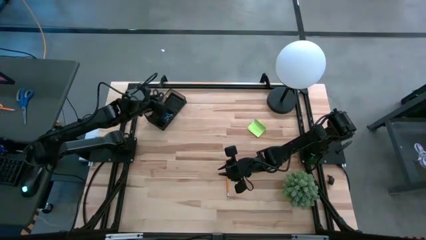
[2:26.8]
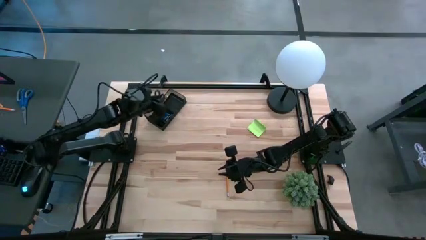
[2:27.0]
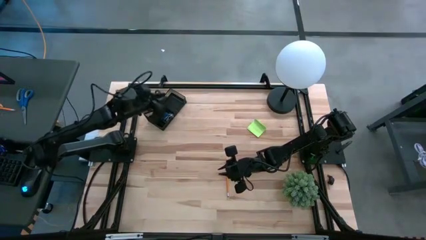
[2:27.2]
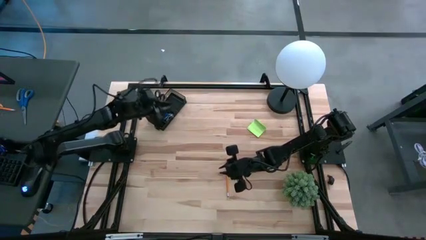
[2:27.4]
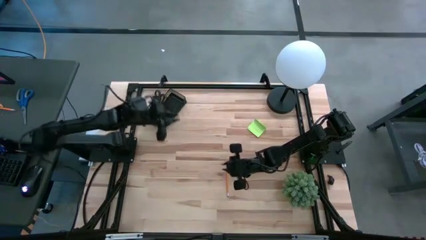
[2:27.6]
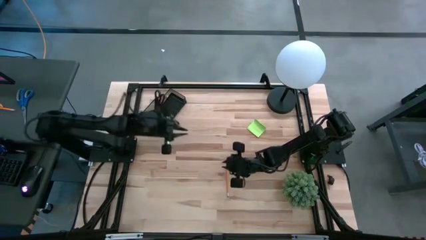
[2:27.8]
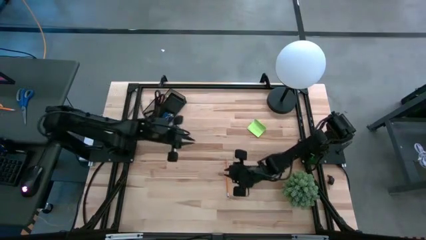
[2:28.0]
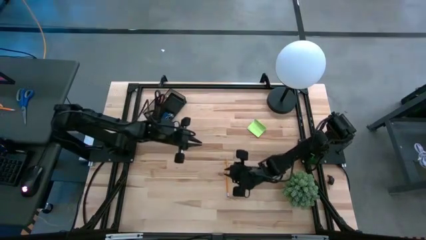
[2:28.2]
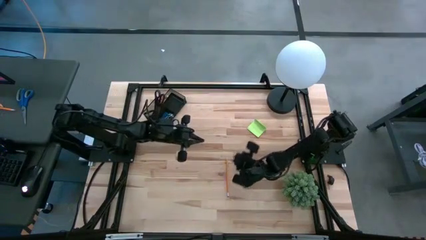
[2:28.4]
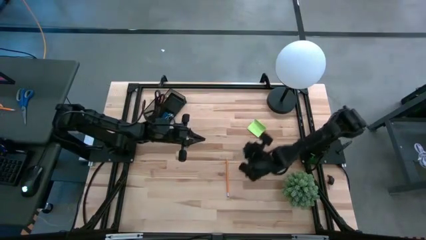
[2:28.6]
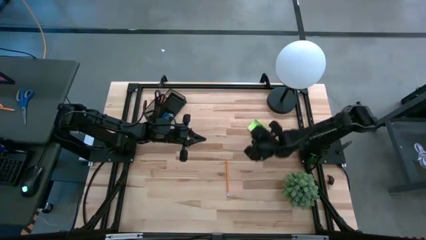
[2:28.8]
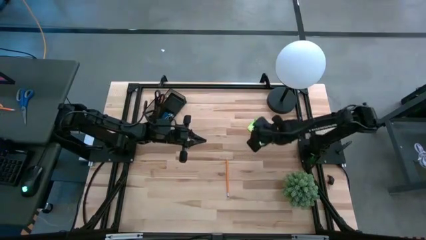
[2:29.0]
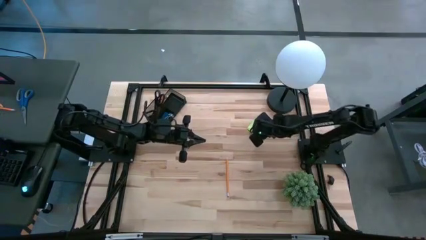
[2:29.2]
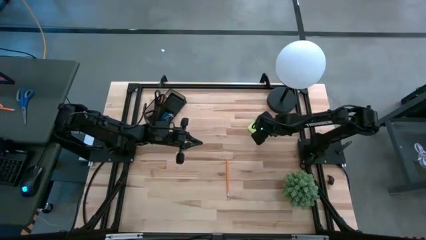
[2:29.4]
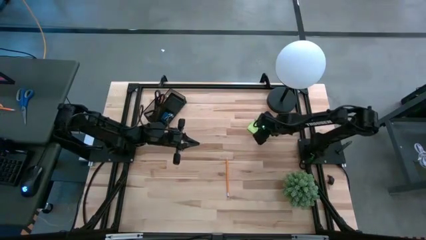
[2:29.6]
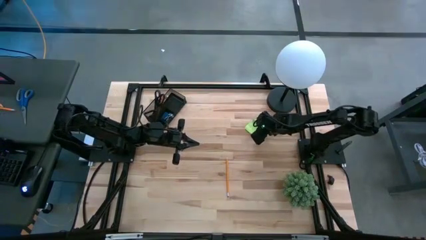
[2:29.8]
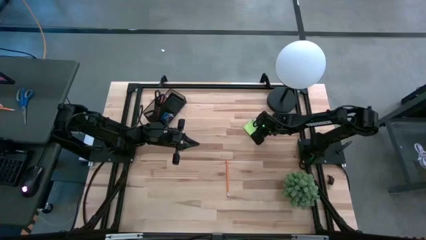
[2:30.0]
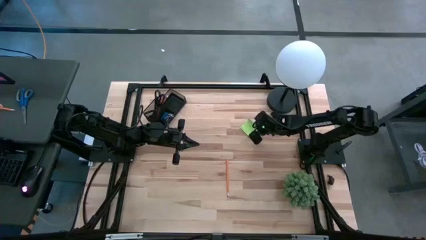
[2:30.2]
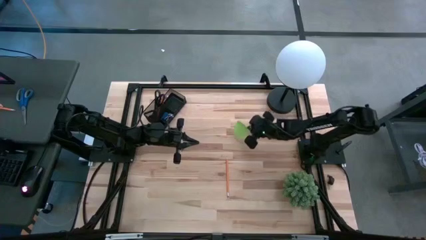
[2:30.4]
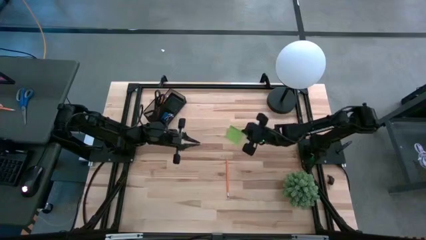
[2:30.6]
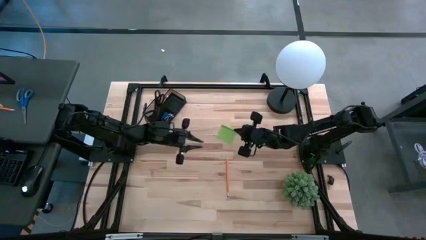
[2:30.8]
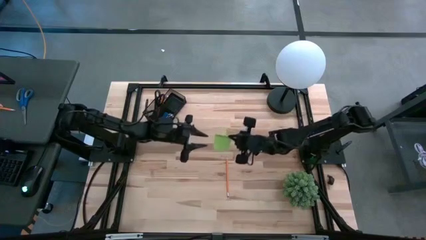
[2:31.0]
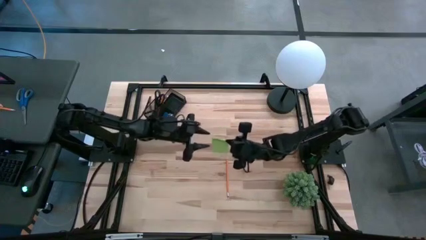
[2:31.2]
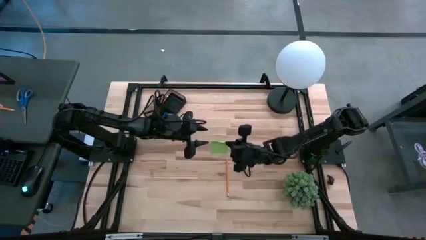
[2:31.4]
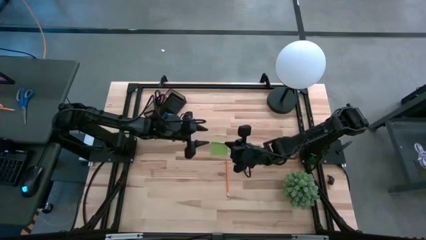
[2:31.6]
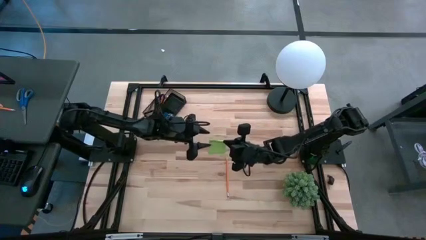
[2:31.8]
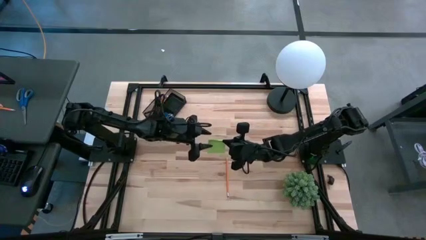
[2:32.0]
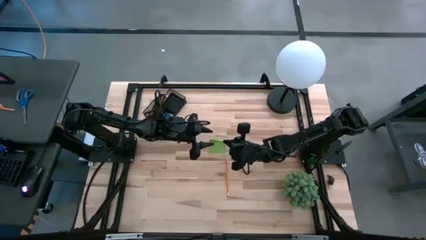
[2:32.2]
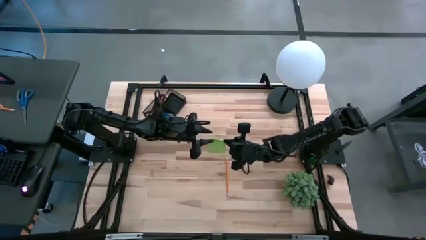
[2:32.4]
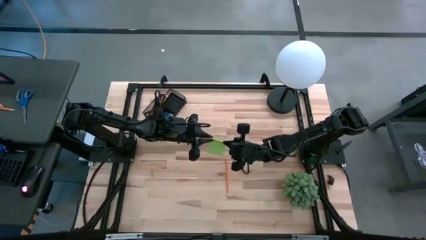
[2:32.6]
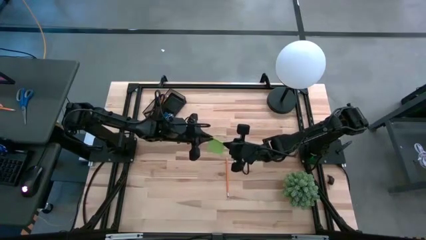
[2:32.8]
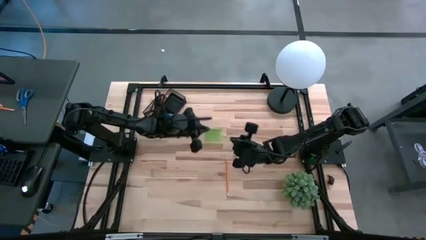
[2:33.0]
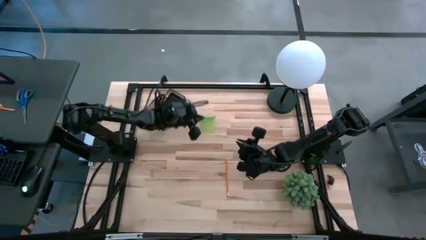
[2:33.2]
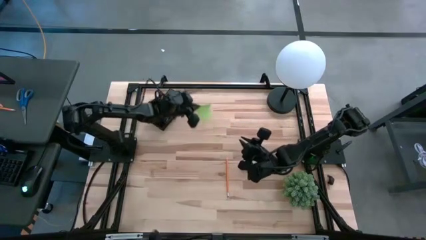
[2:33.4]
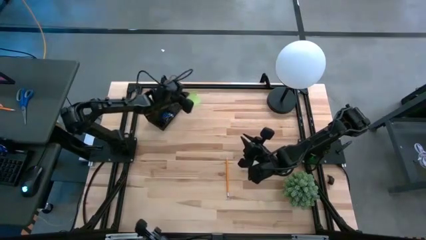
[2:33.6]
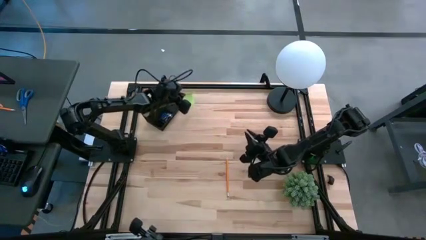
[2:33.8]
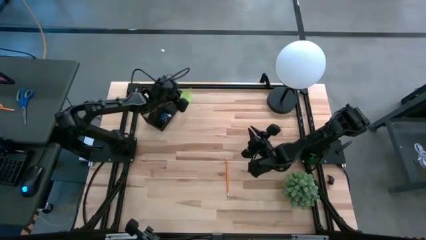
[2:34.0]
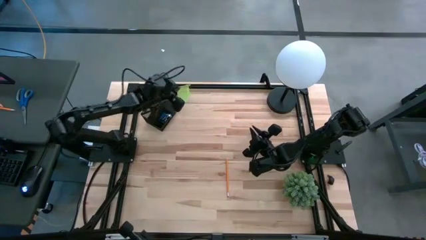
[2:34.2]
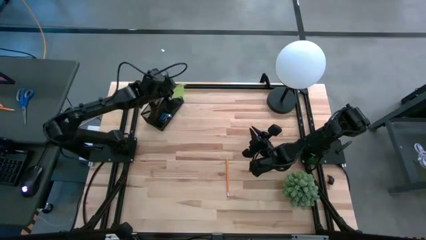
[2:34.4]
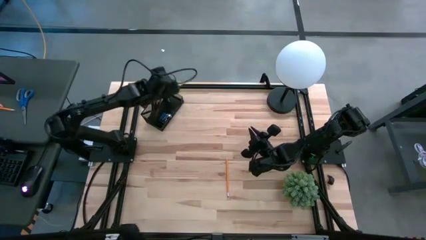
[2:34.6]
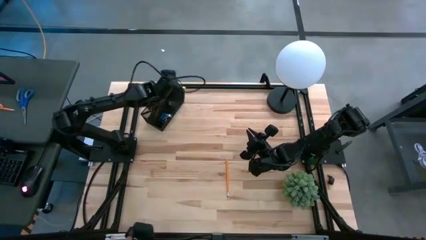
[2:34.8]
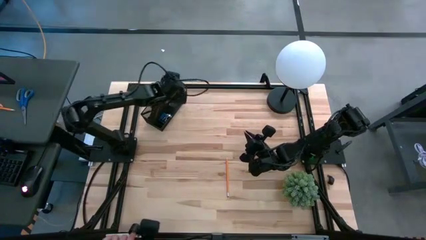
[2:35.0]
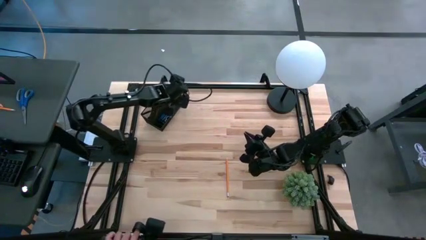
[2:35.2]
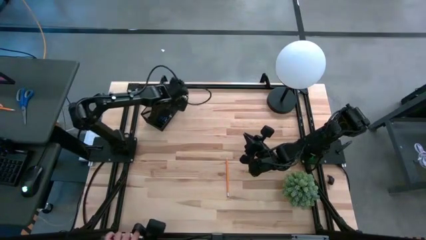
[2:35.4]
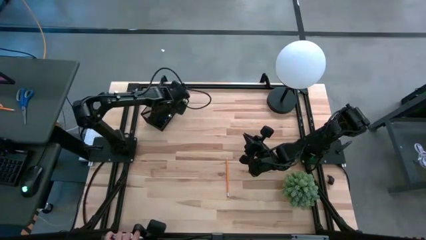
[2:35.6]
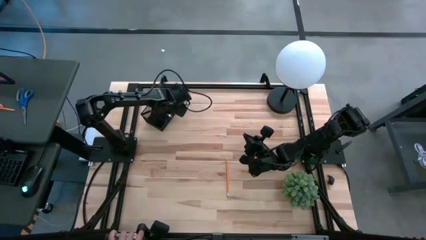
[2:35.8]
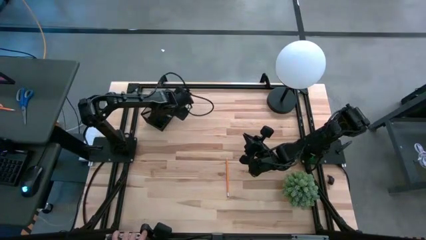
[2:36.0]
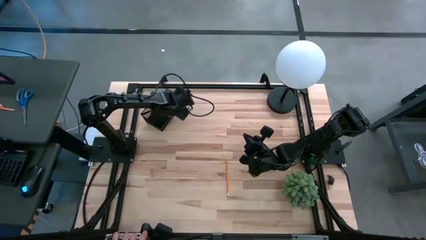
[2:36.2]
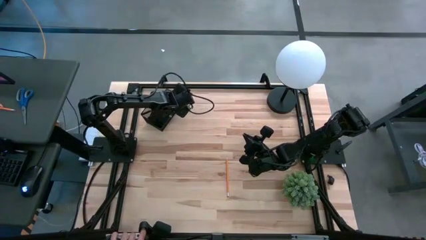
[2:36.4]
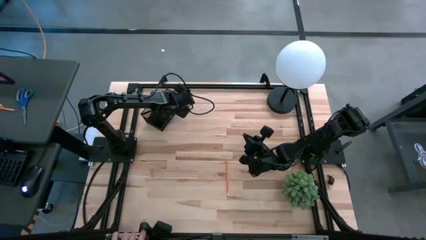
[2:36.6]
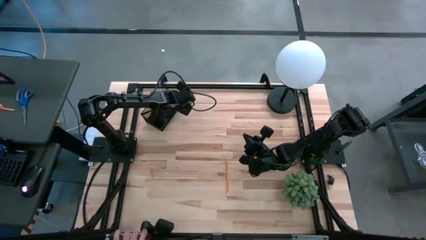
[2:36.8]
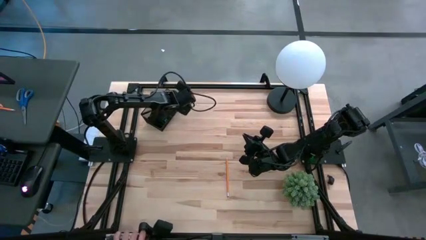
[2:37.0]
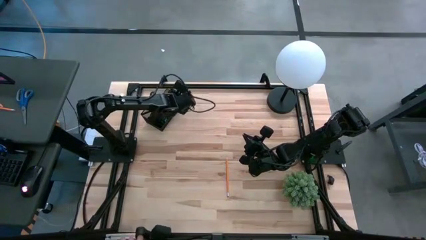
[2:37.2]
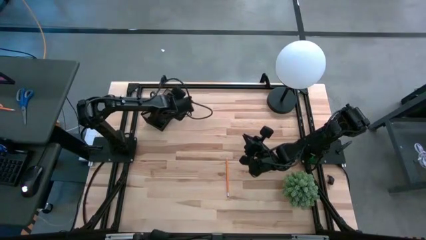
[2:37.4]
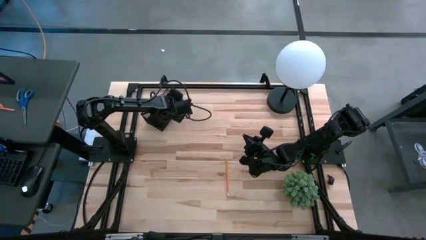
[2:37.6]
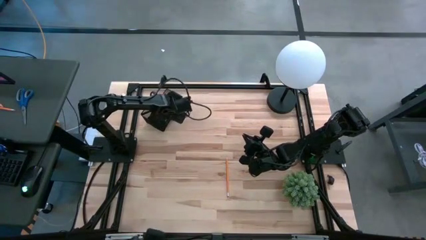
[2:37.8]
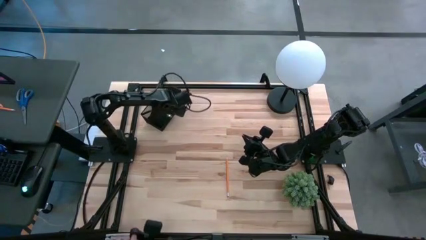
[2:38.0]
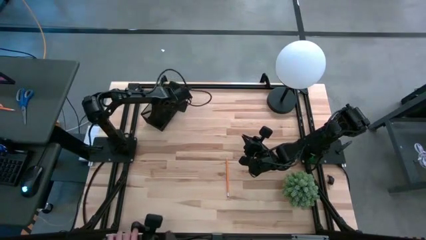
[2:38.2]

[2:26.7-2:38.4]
Task: Pick and place office supplies into organizer
Put the green sticky note into the right section of the desk organizer
